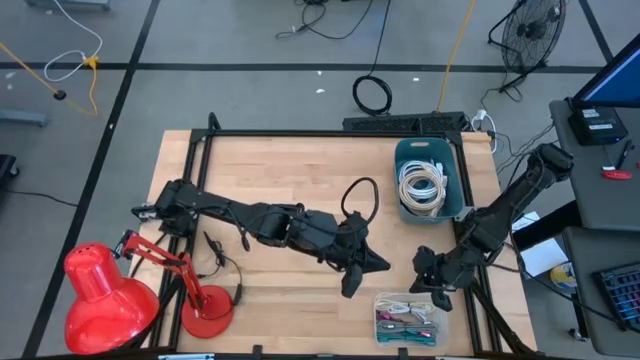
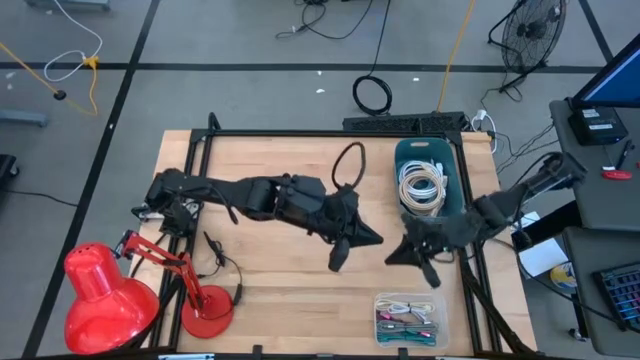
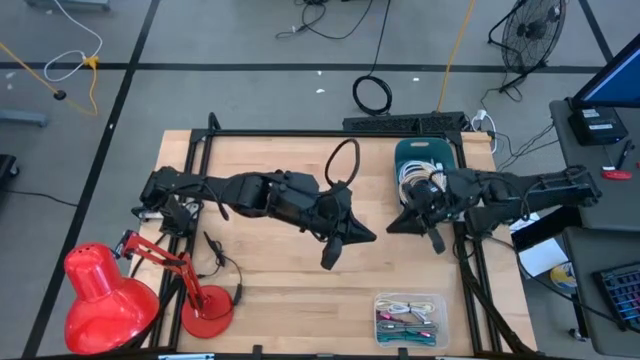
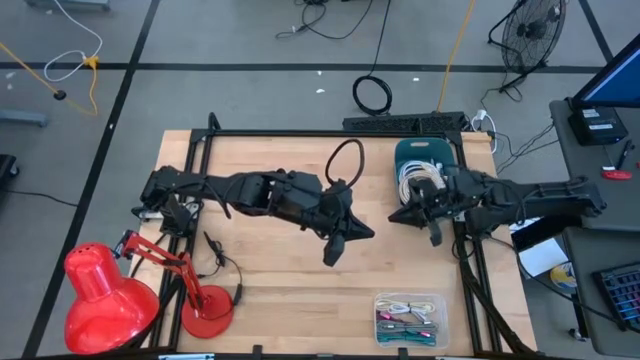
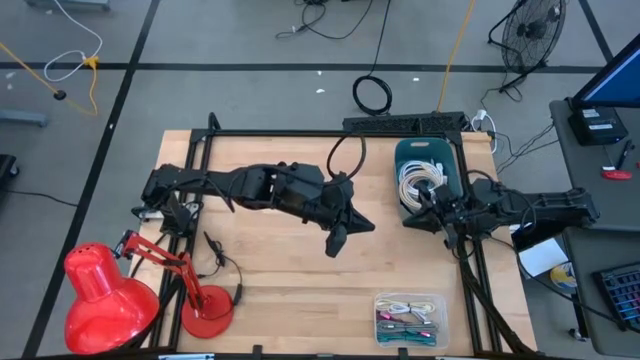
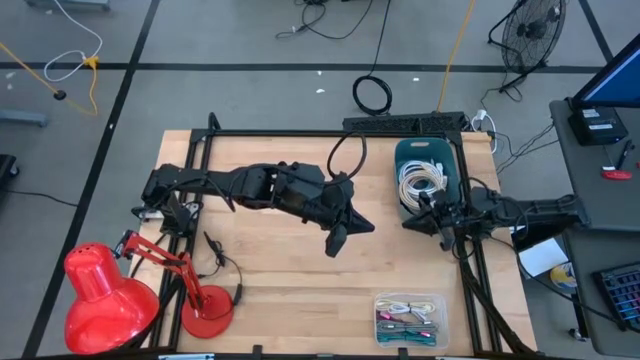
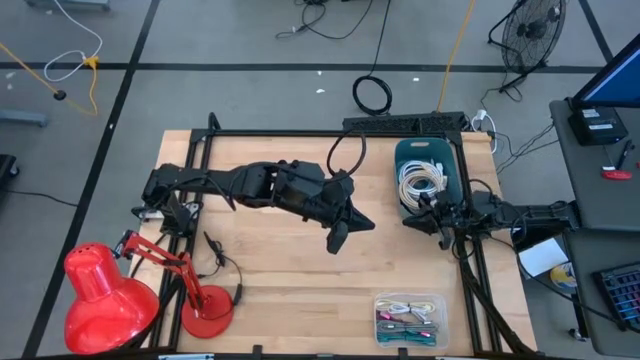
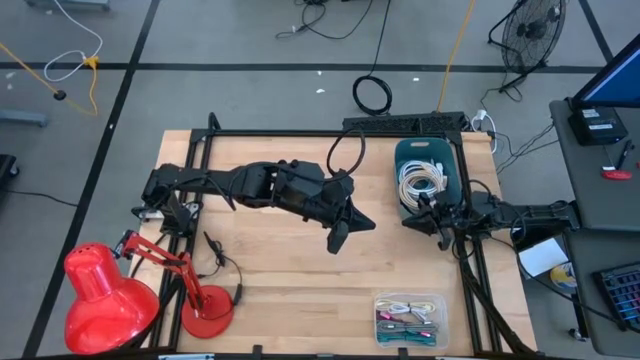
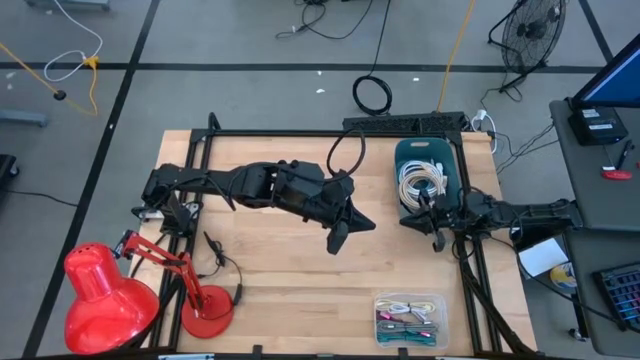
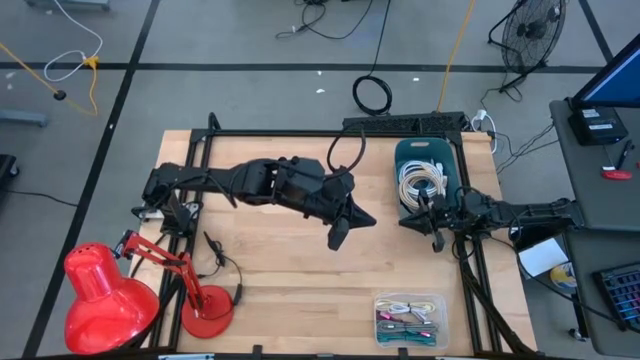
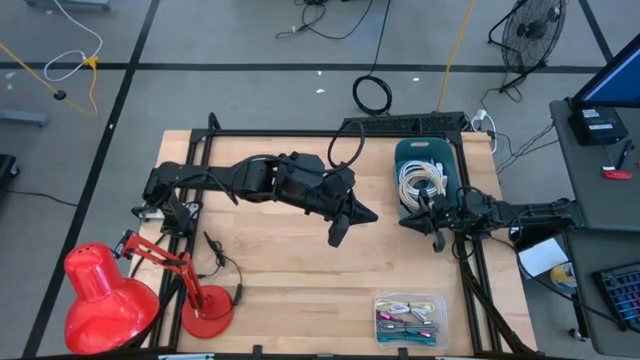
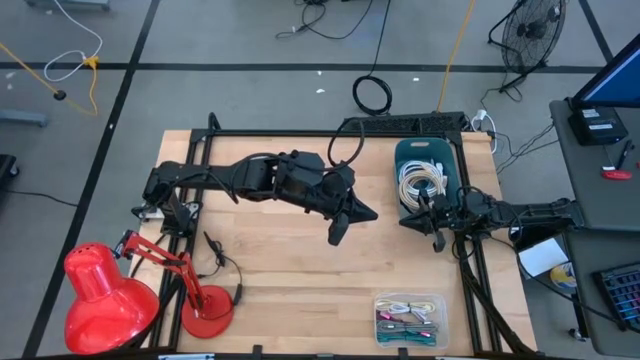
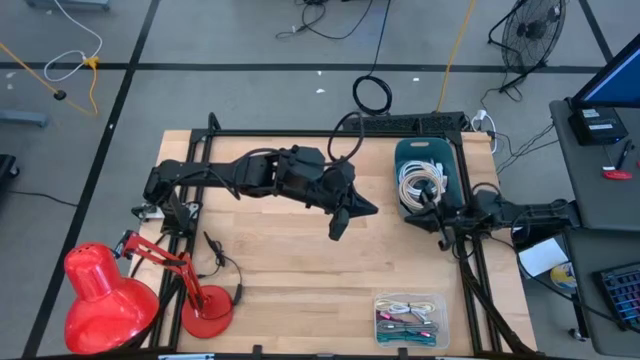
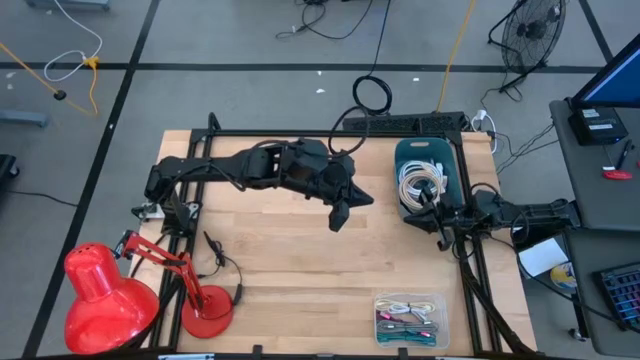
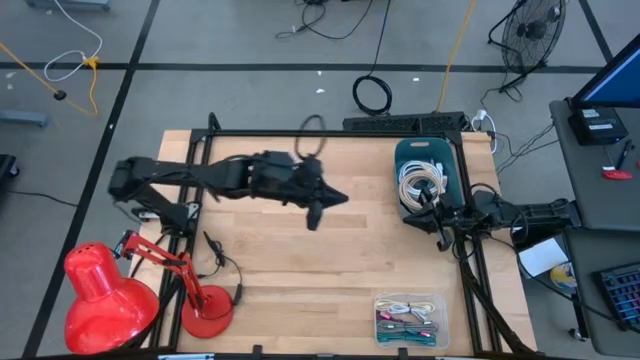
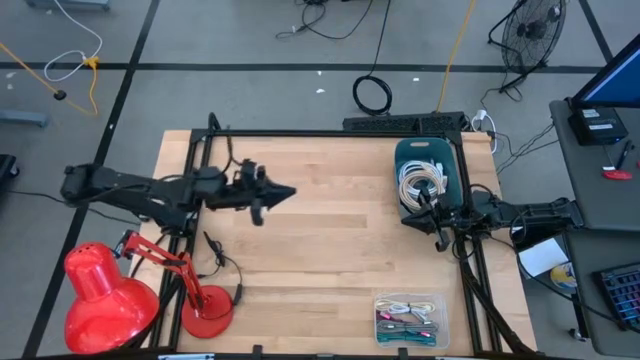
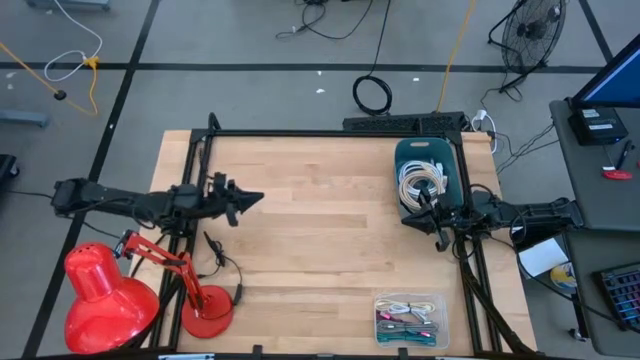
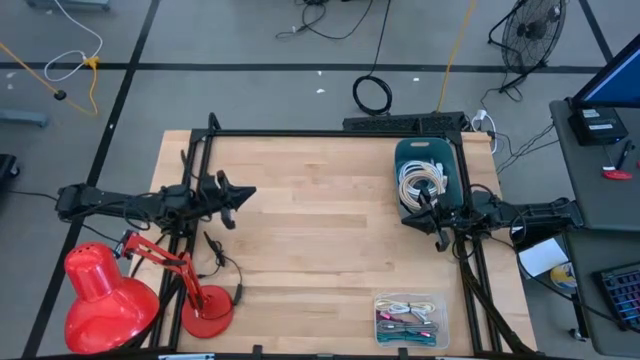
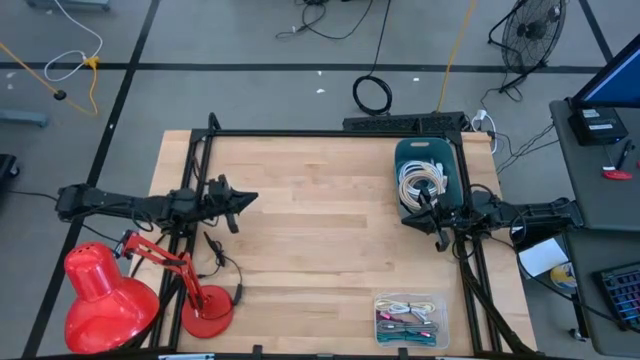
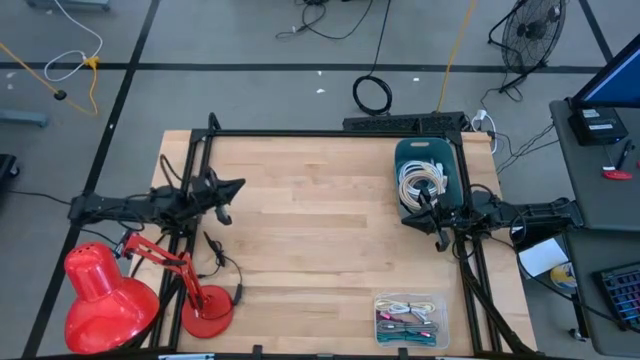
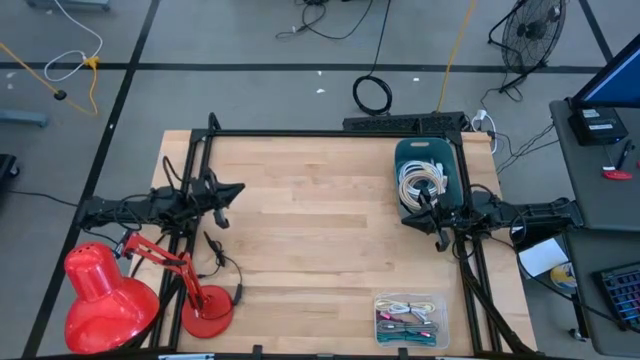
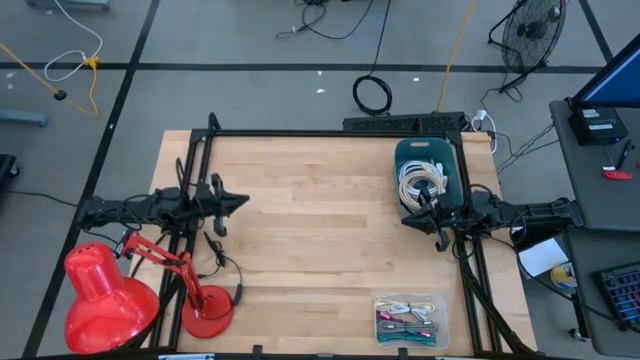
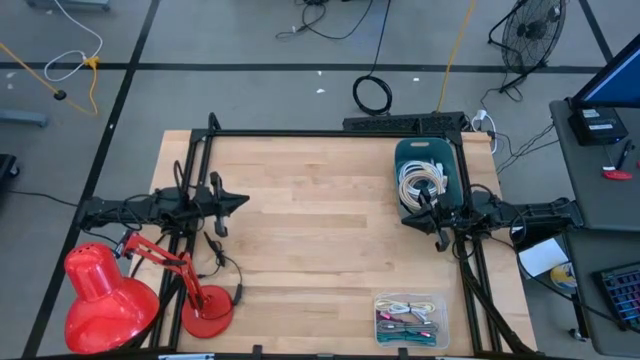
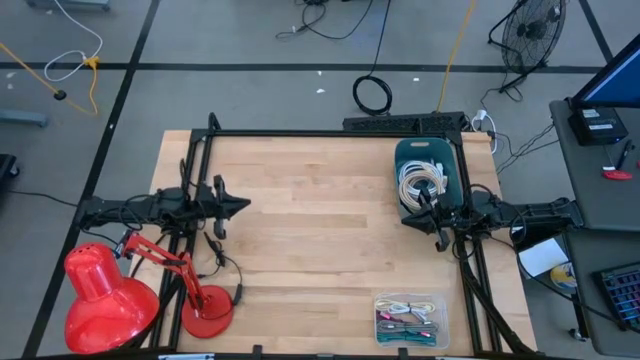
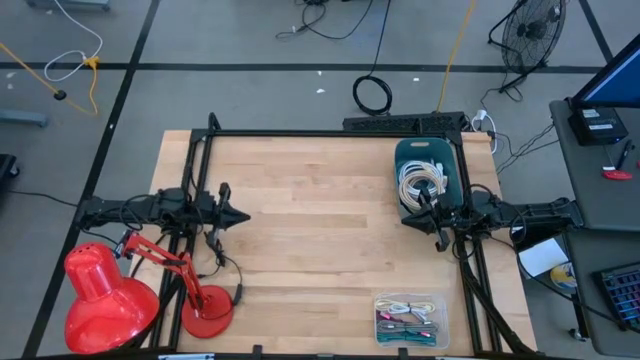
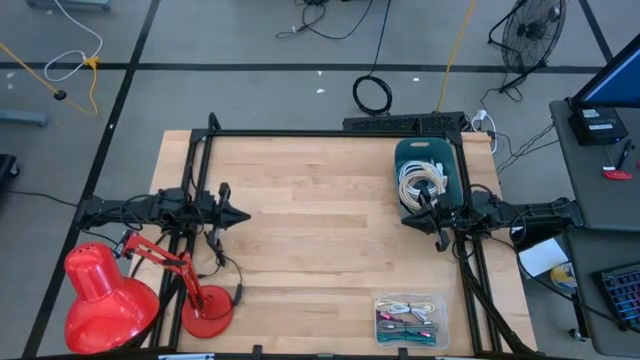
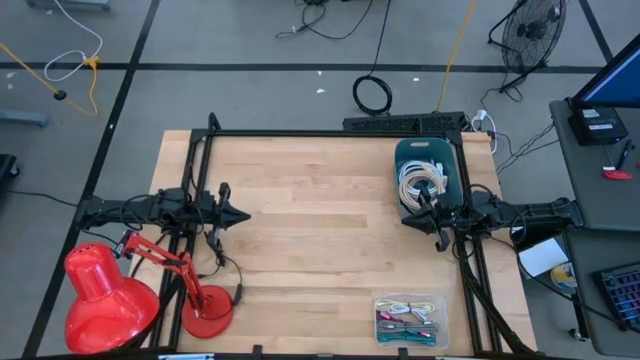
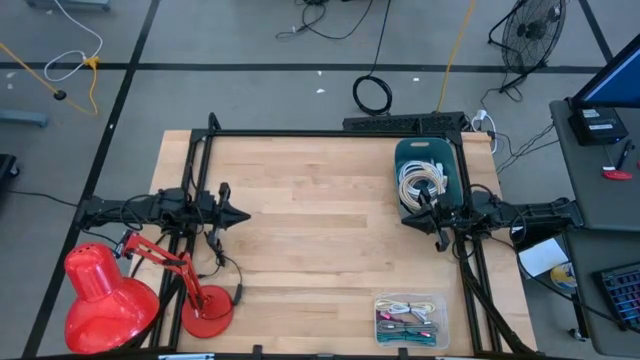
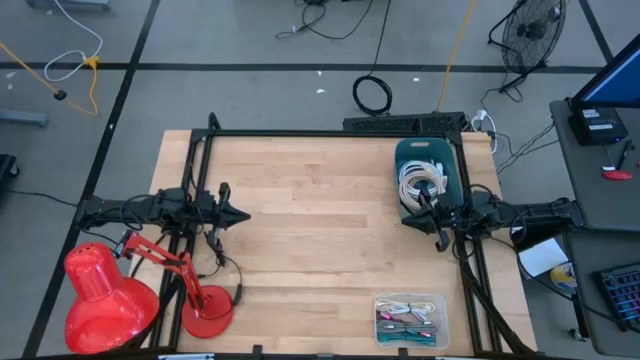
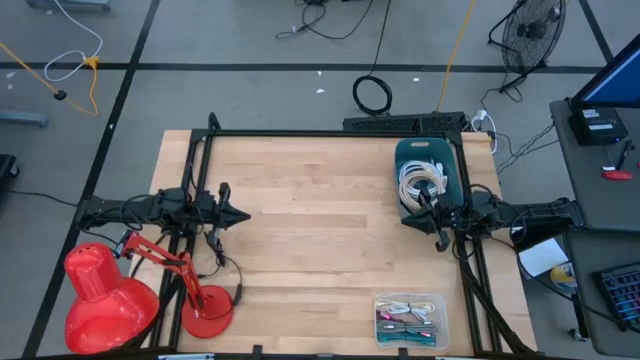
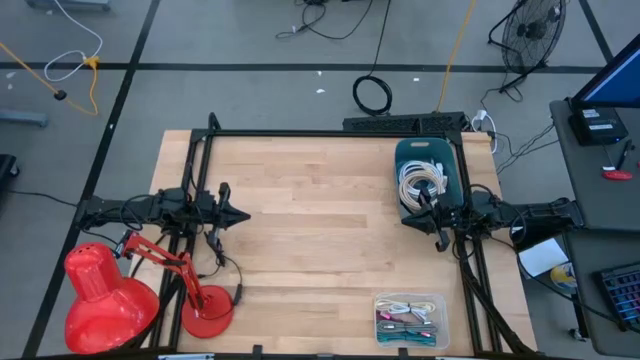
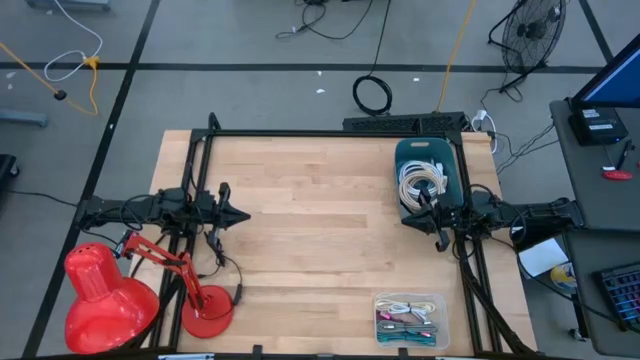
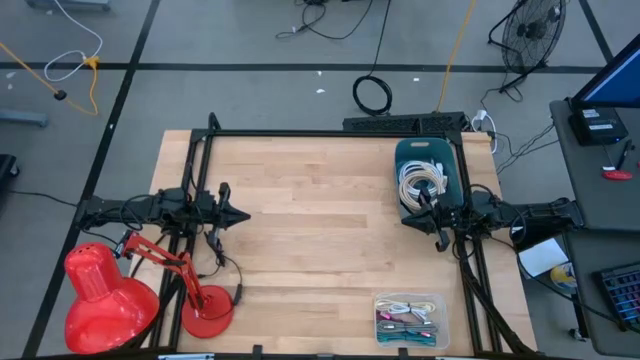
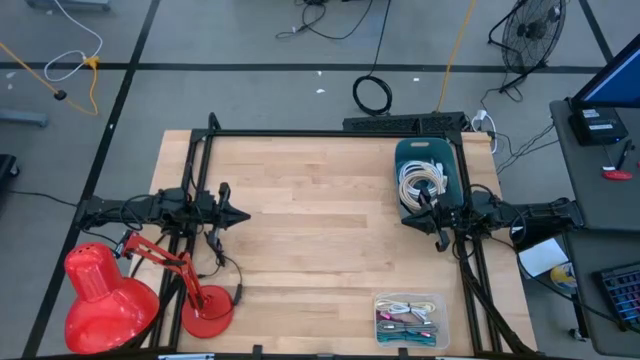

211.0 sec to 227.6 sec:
Task: Pick & Place USB Port
Return to Home Position

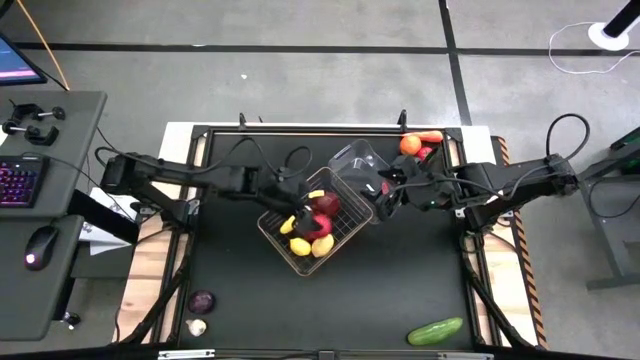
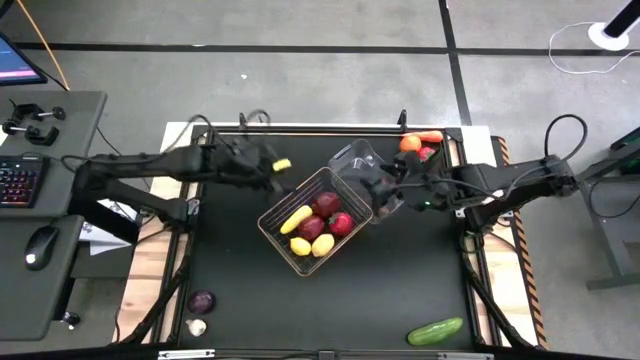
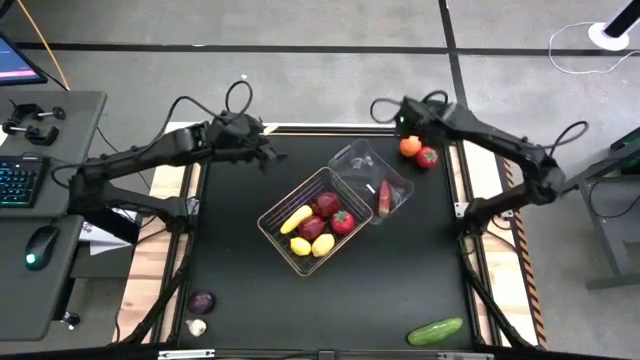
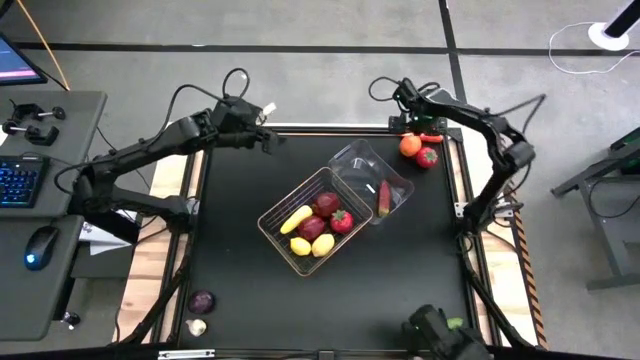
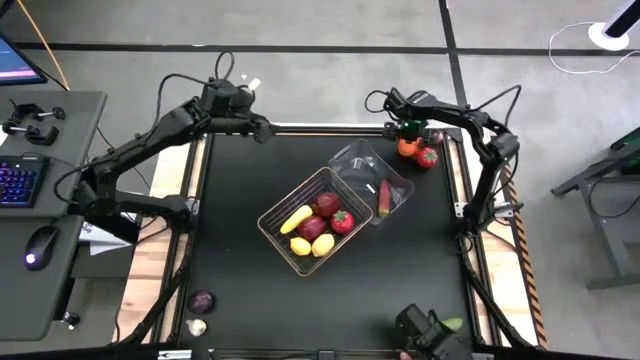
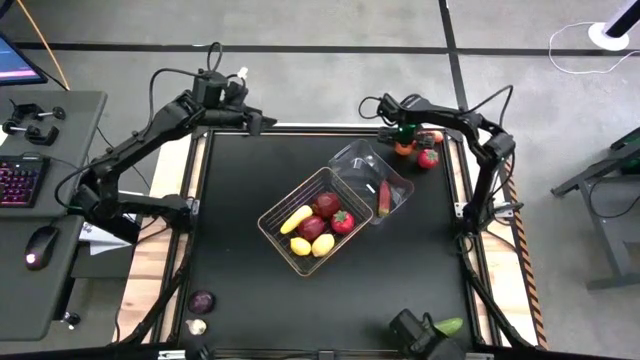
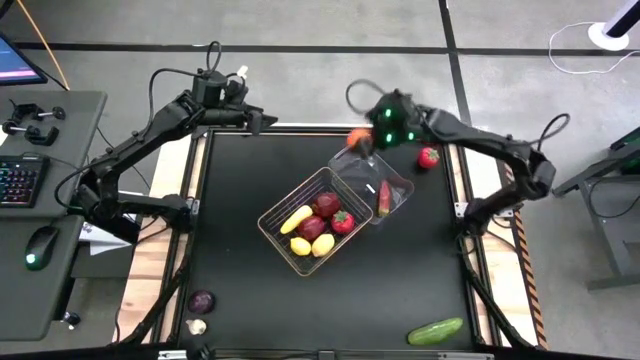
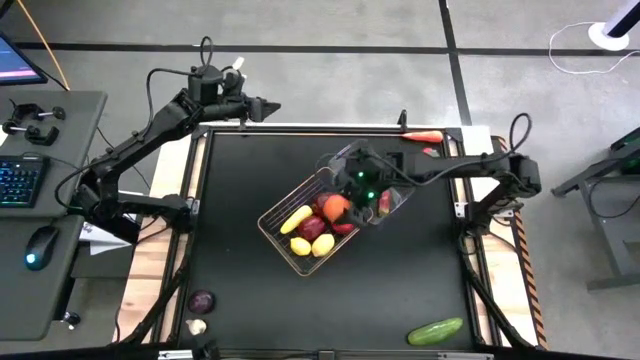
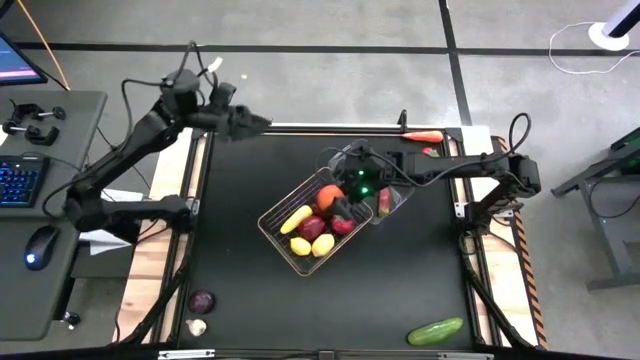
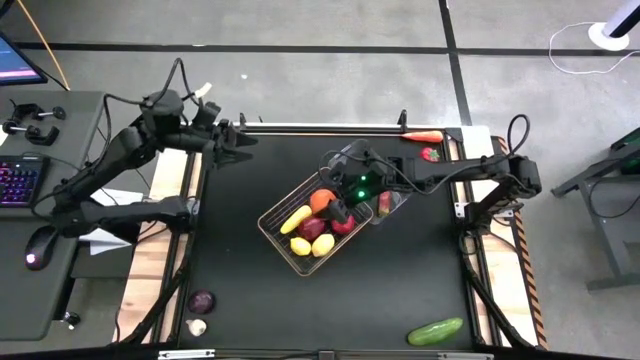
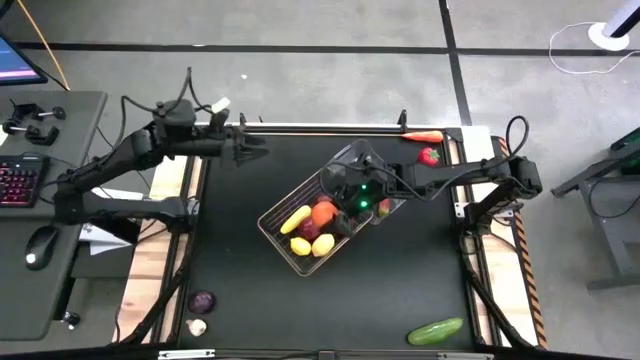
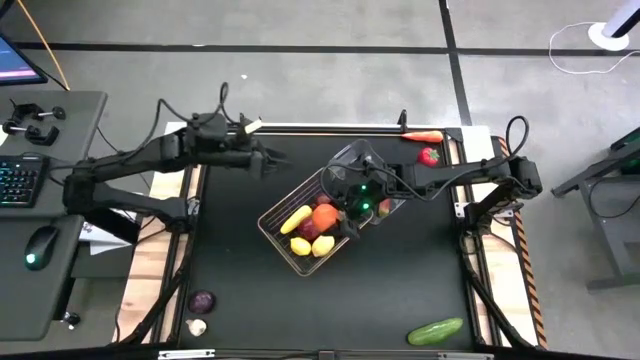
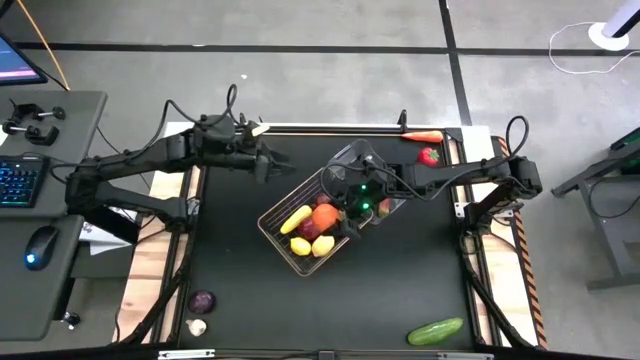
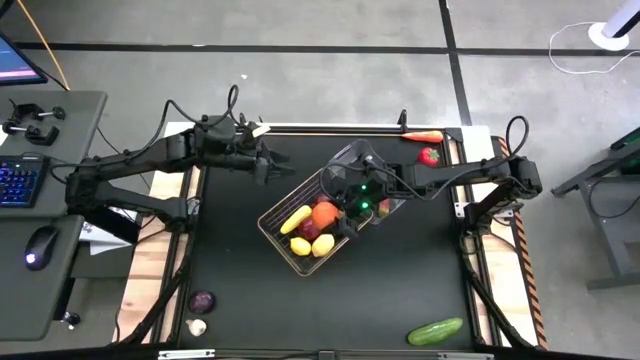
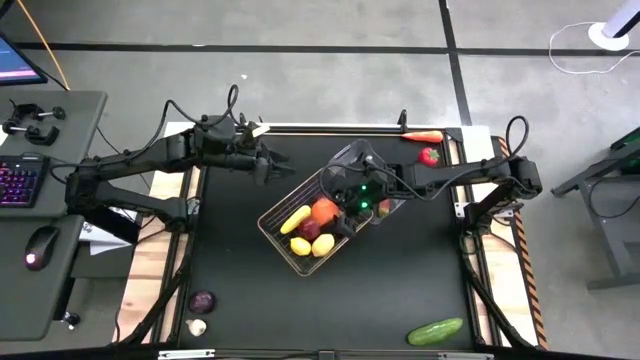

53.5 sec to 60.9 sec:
Task: Sort produce into baskets
Put the orange into the gold wire basket
